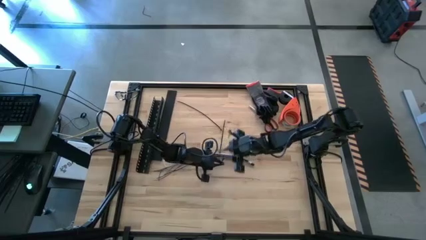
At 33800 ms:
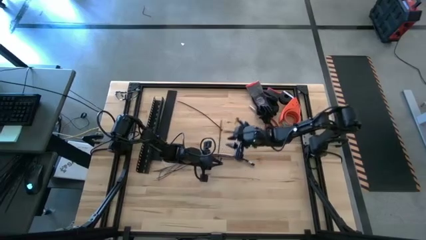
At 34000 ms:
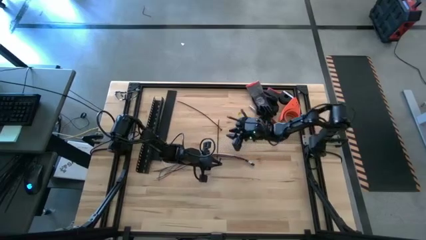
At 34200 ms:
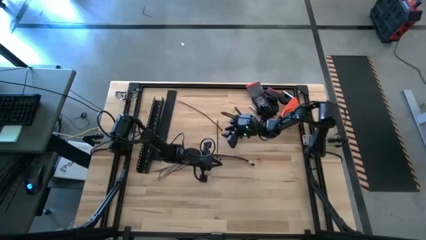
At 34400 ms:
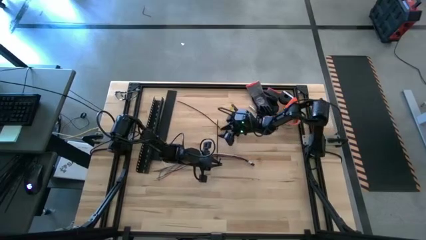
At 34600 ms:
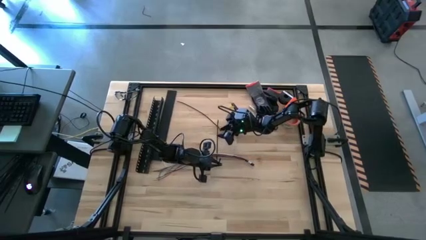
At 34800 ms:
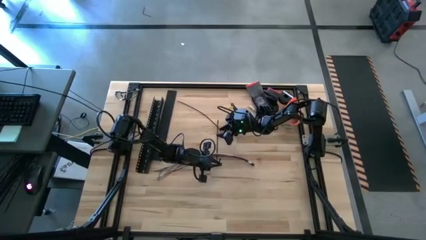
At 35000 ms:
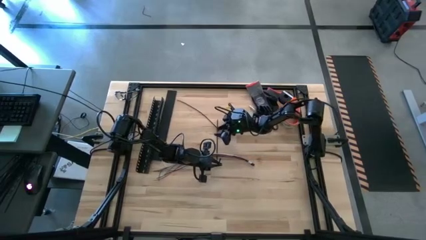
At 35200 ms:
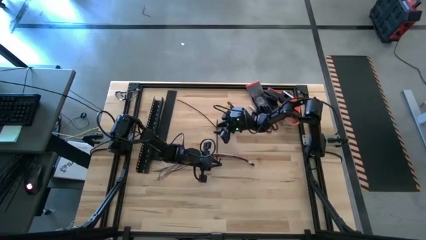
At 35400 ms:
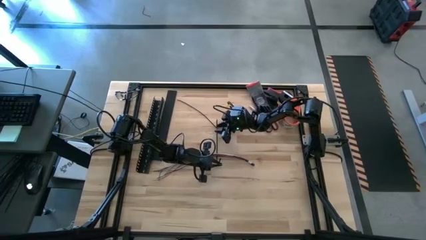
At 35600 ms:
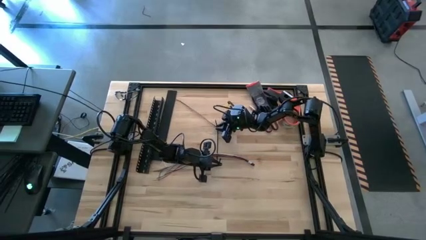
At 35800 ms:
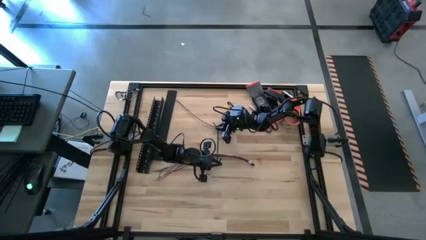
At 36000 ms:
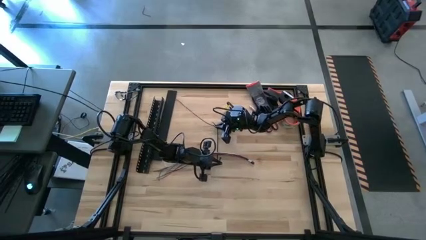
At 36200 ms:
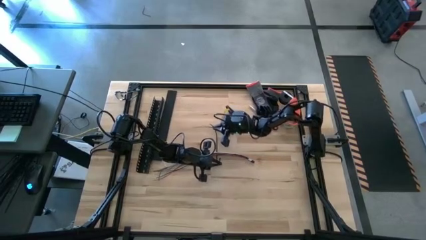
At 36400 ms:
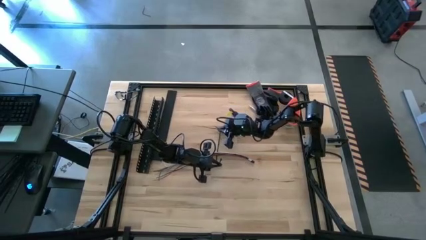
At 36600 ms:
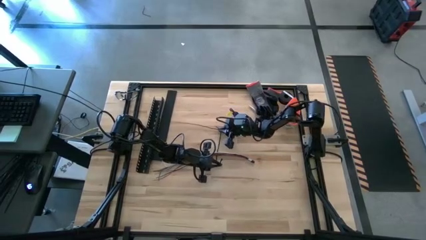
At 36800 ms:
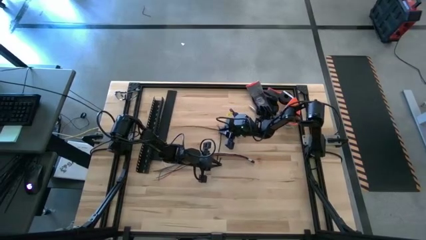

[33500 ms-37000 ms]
Task: Ziptie cables
Wrap the cables together using the left black zip tie

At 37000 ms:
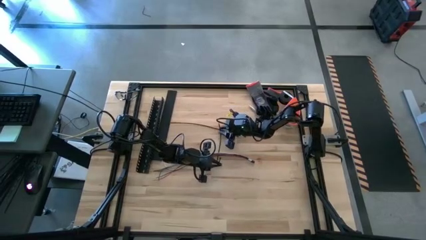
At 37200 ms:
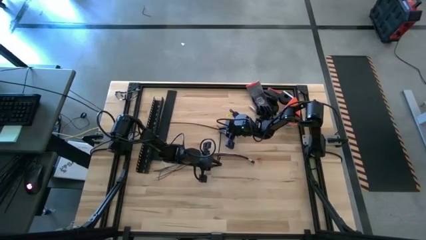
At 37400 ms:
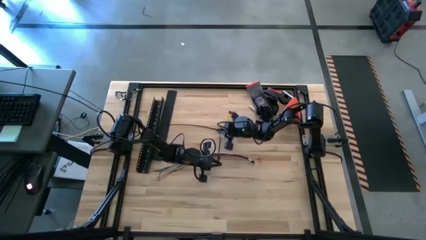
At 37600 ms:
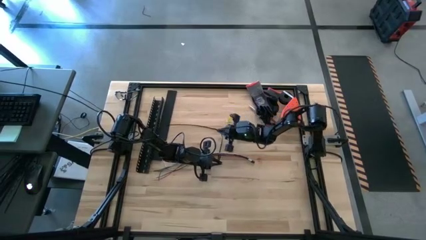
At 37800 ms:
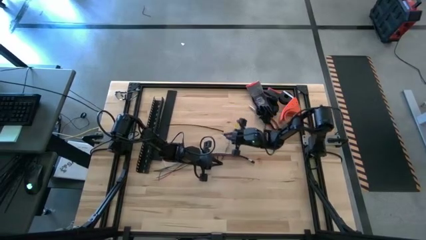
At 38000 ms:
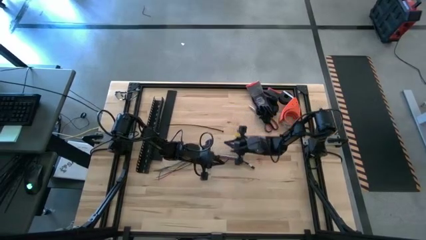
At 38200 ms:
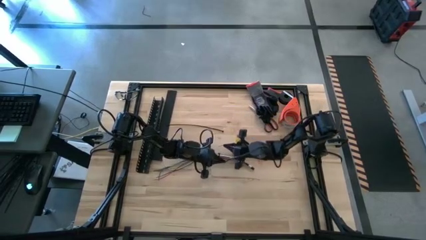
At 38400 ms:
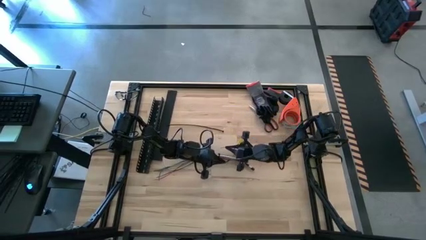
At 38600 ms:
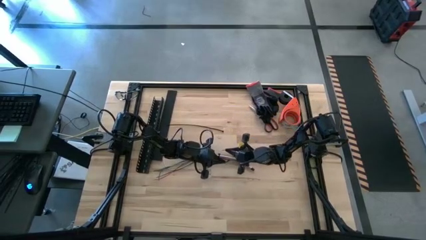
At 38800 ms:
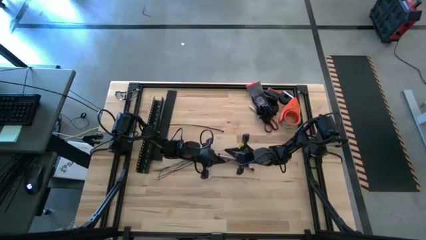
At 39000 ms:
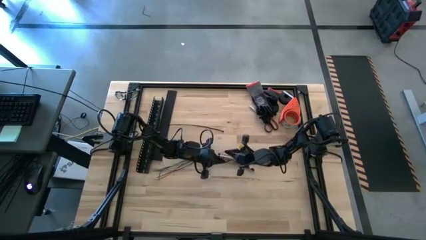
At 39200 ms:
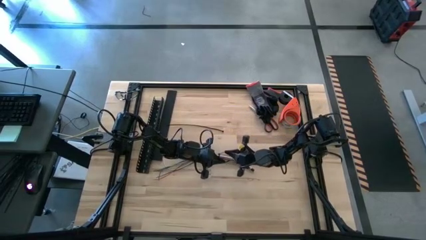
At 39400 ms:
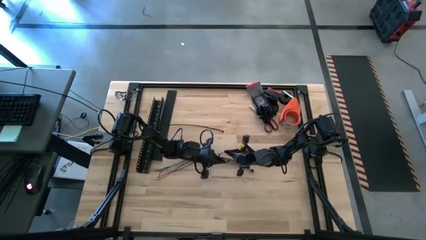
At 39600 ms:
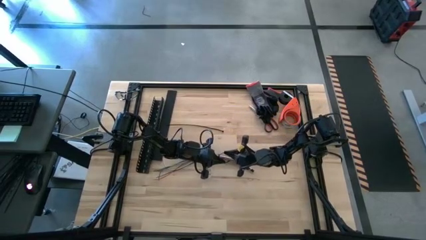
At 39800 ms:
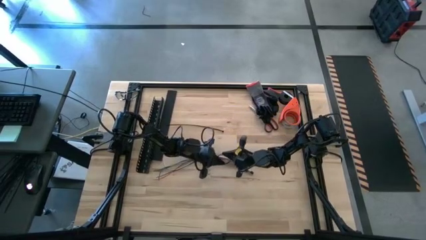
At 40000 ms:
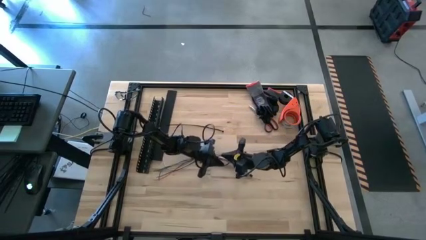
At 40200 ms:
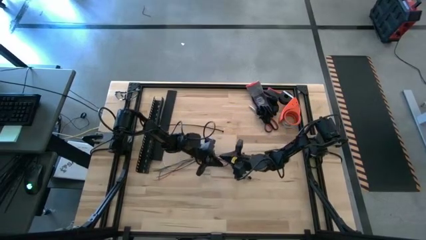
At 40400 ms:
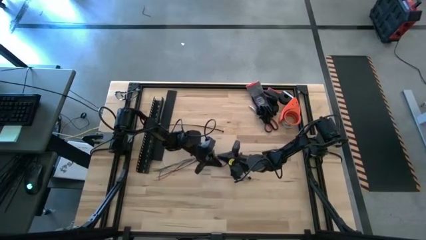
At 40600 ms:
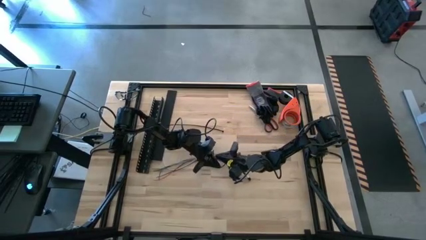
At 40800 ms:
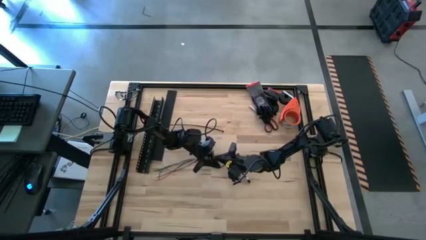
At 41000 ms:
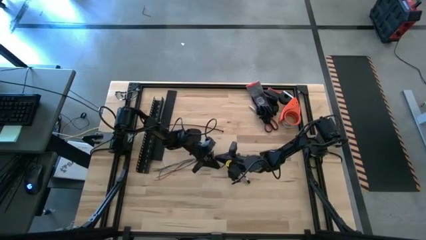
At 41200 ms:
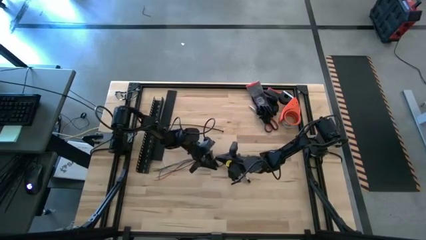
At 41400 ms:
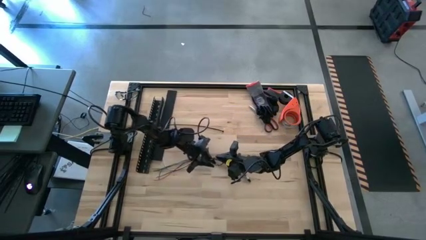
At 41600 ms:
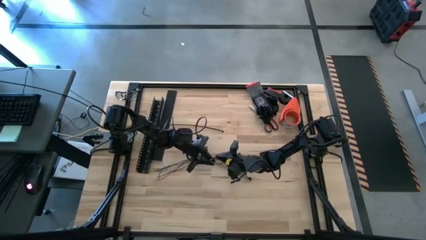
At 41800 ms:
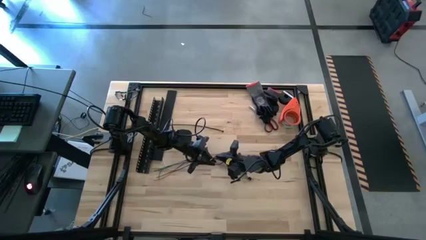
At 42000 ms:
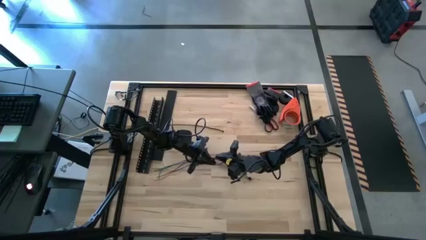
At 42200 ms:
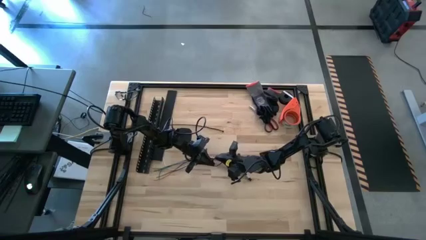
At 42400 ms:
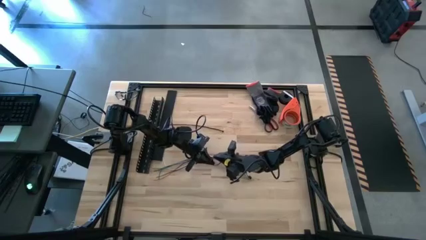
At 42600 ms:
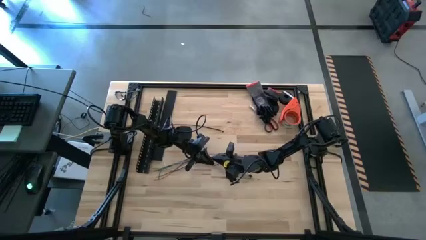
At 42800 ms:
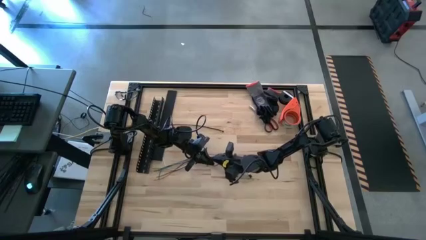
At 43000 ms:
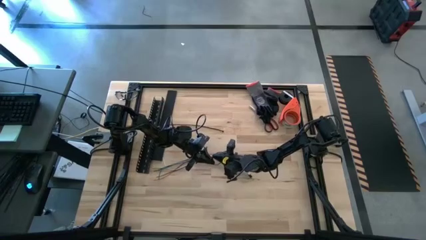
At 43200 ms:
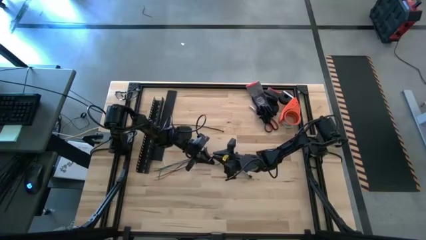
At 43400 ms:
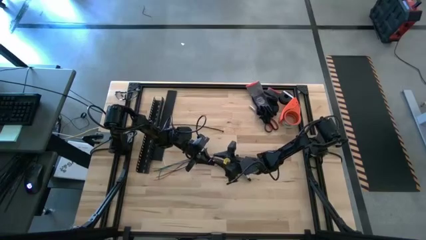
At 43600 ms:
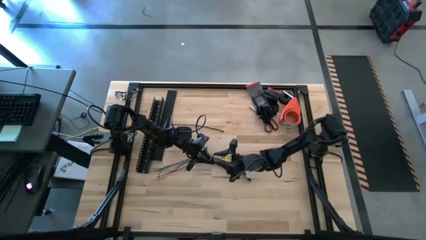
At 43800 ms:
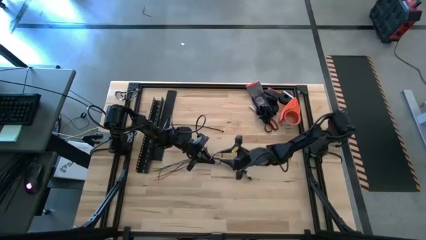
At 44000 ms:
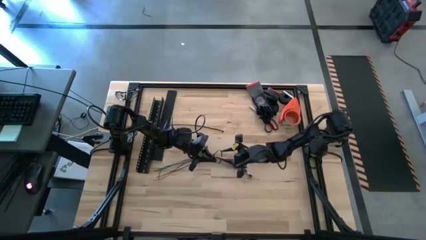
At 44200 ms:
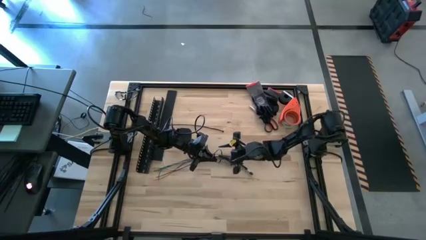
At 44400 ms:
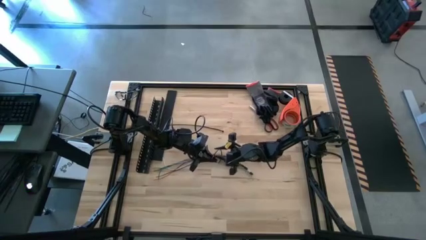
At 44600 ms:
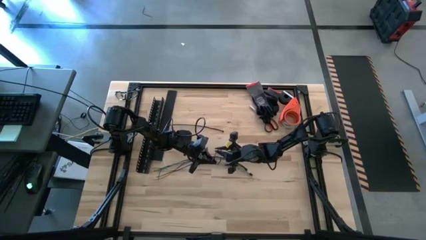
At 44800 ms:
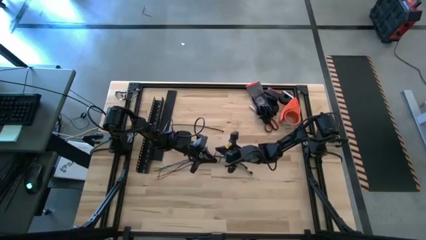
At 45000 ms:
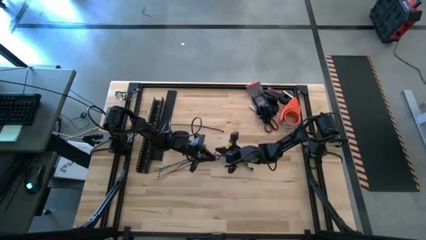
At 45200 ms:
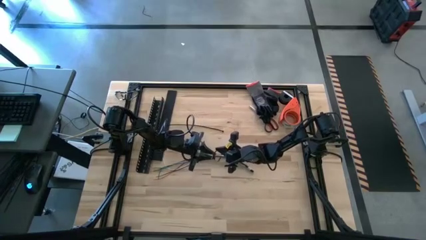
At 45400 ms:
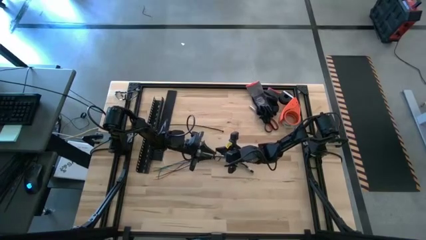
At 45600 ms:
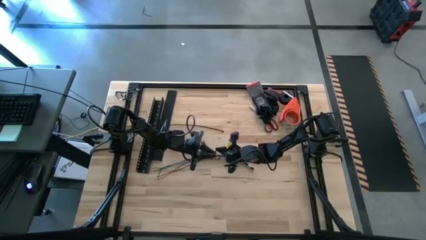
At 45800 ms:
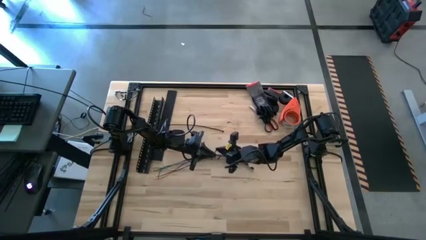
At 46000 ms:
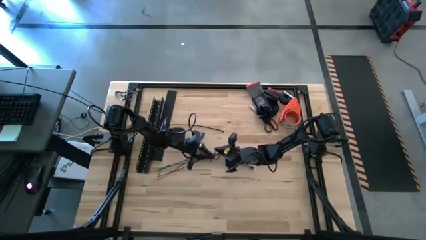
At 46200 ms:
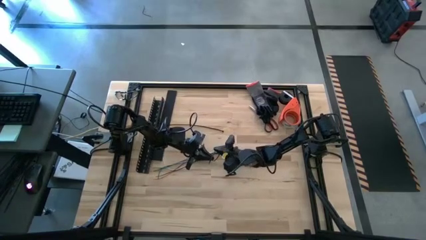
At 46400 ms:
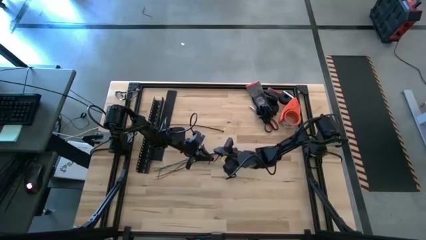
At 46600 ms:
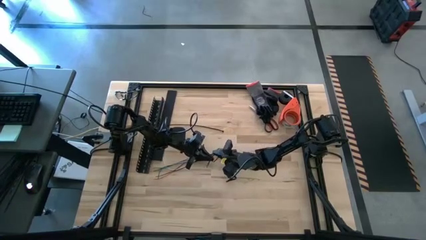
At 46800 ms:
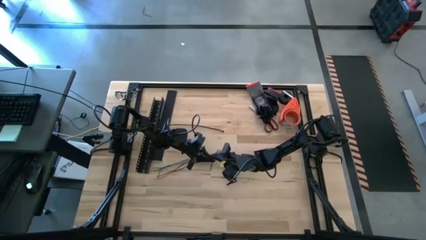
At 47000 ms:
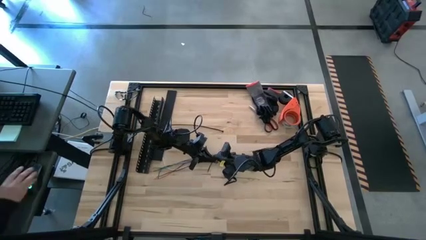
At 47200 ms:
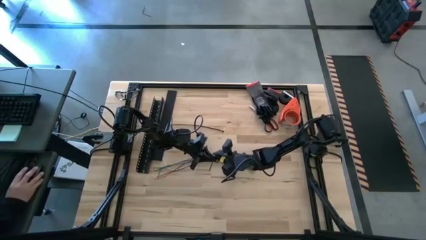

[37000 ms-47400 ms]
Wrap the cables together using the left black zip tie

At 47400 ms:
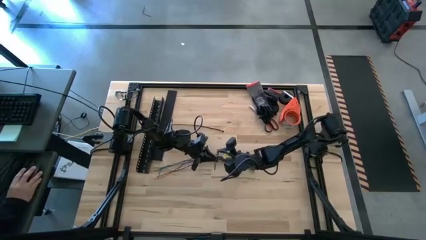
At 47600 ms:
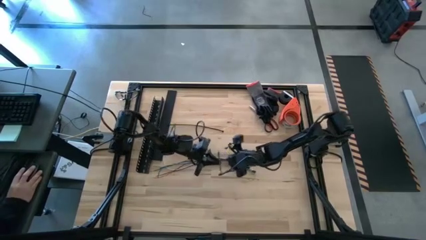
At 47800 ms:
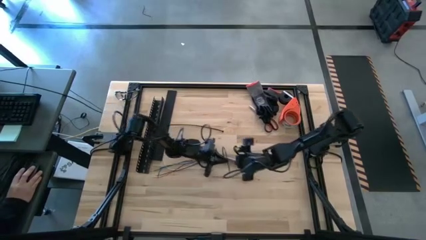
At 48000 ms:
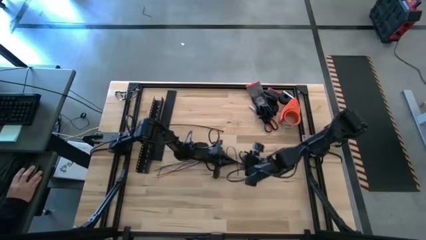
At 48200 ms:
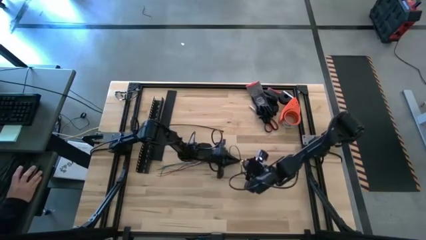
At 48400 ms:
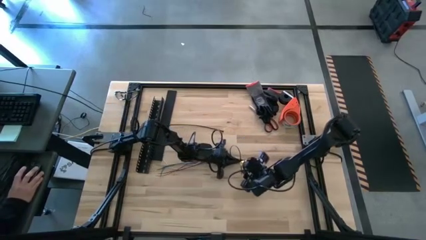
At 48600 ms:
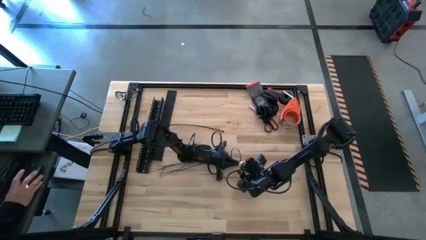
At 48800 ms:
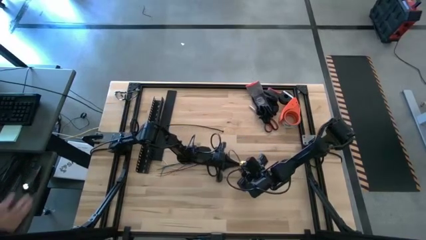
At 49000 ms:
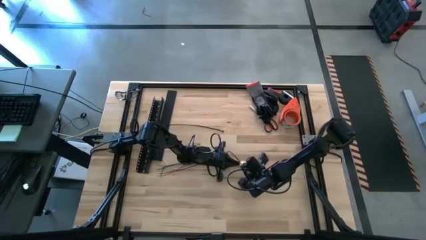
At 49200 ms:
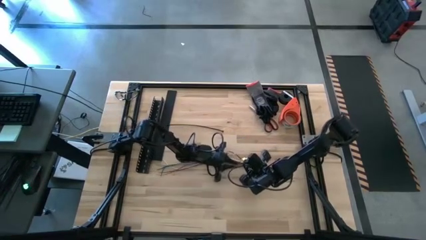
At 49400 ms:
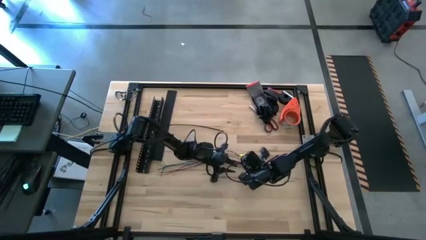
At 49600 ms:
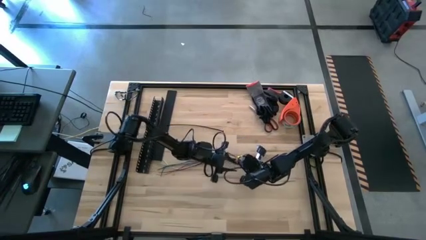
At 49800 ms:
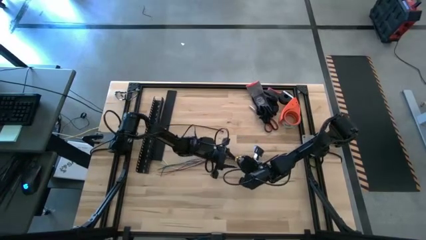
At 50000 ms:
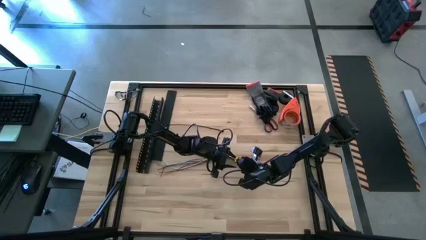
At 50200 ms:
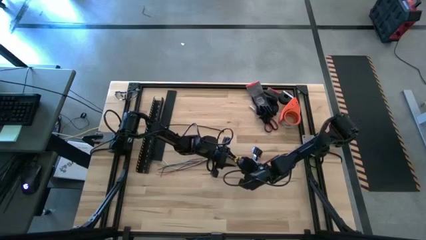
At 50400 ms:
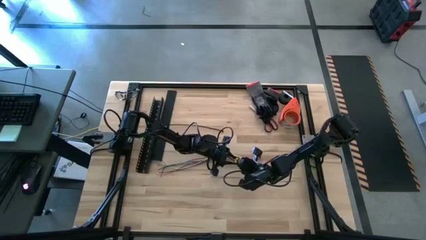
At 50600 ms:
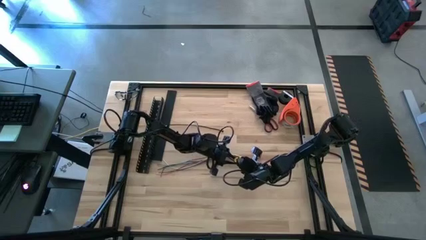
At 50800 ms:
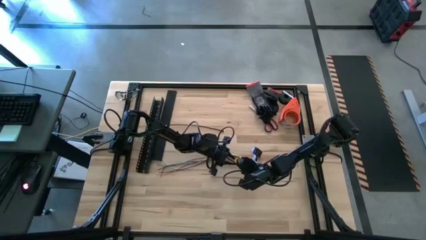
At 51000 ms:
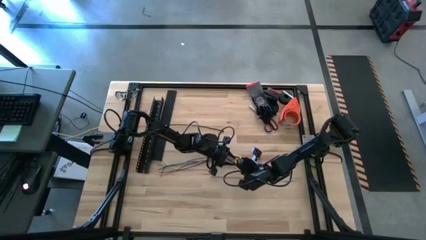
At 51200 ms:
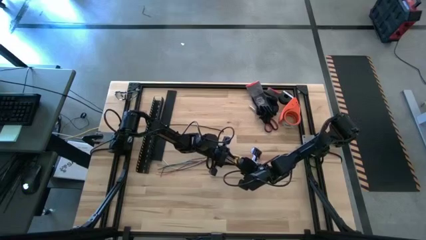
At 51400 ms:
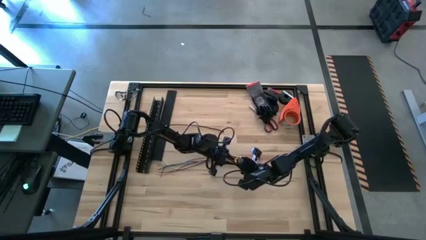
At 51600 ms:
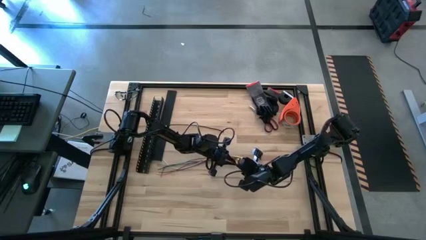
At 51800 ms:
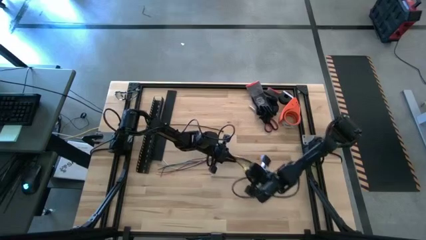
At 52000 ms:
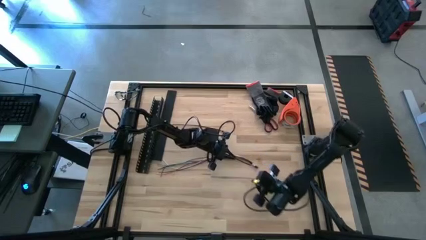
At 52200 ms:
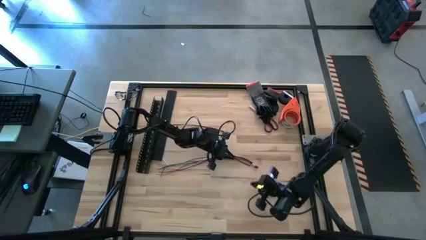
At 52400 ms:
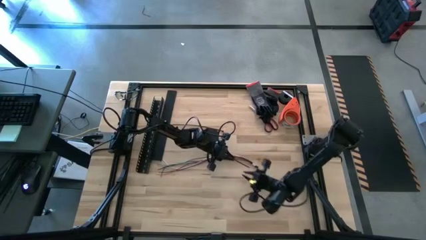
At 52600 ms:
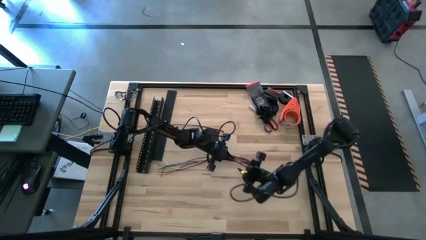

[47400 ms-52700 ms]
Wrap the cables together using the left black zip tie
